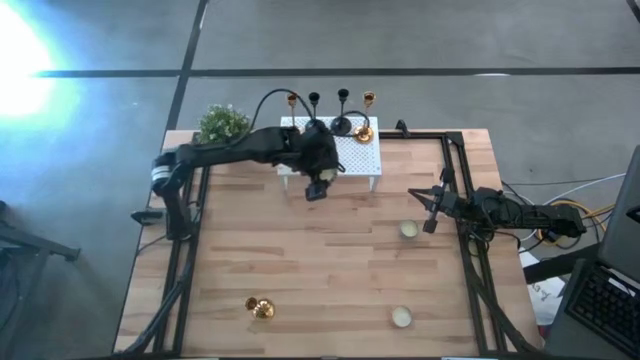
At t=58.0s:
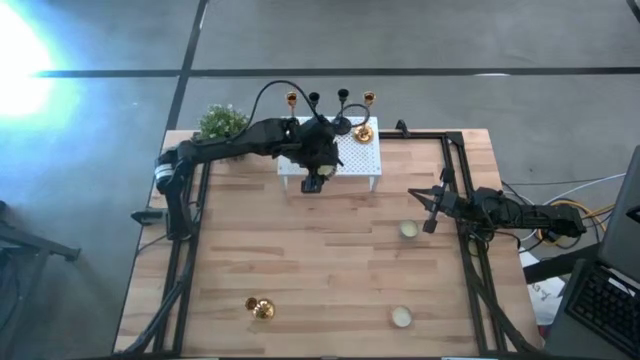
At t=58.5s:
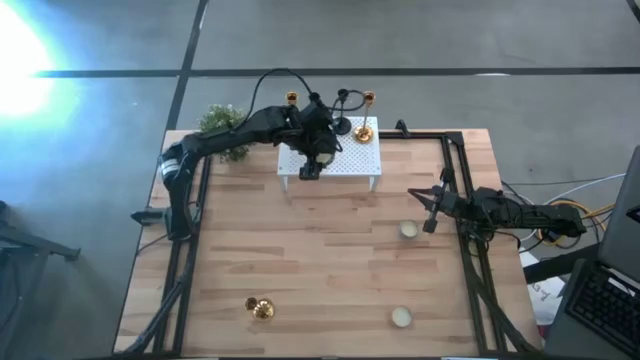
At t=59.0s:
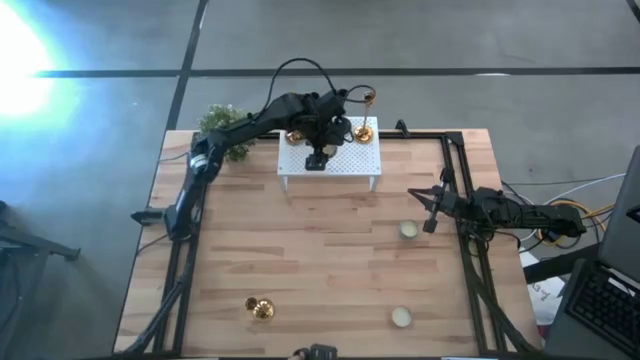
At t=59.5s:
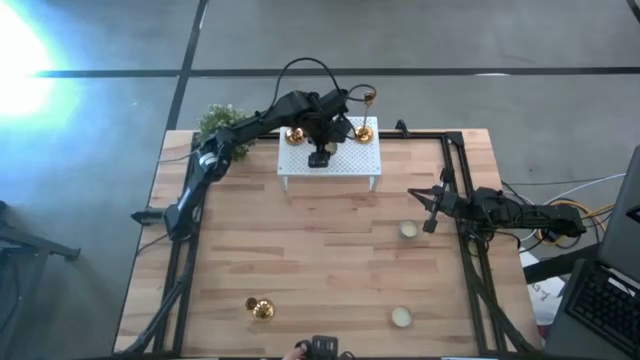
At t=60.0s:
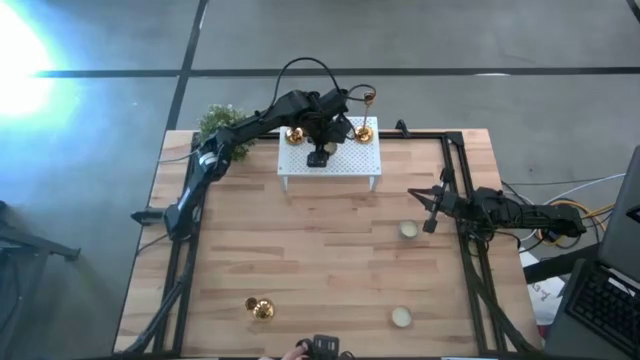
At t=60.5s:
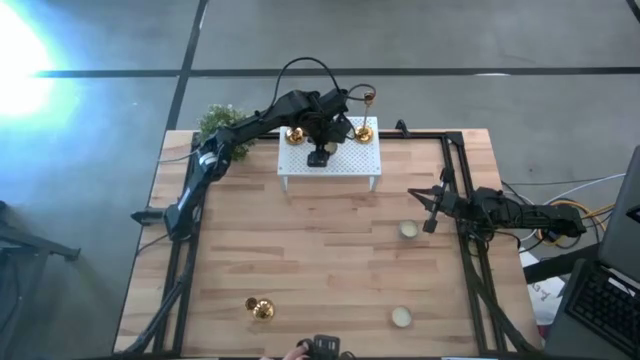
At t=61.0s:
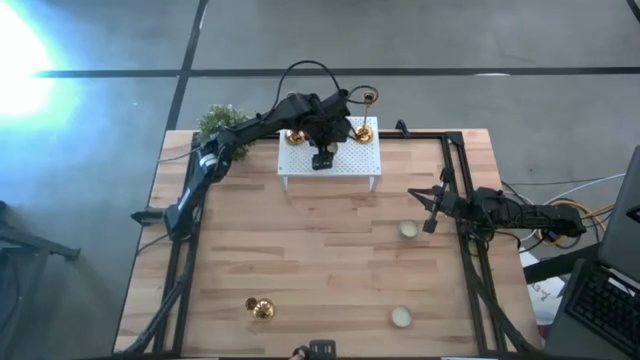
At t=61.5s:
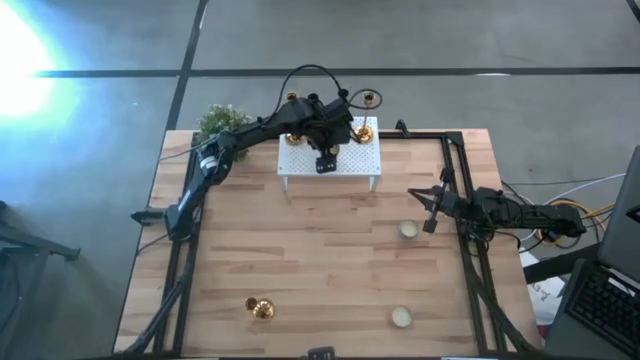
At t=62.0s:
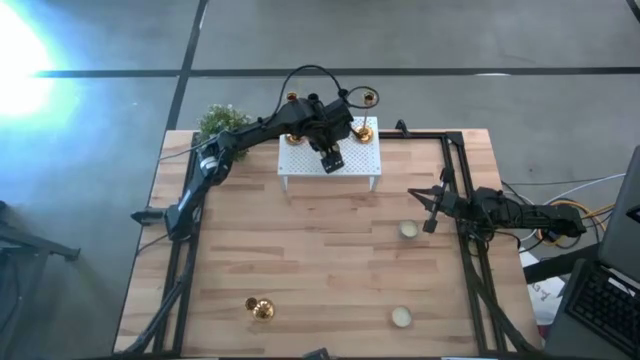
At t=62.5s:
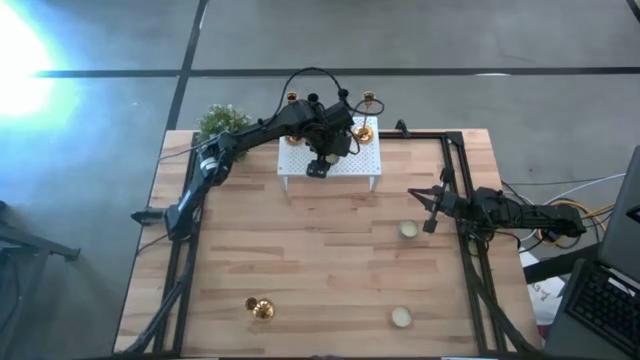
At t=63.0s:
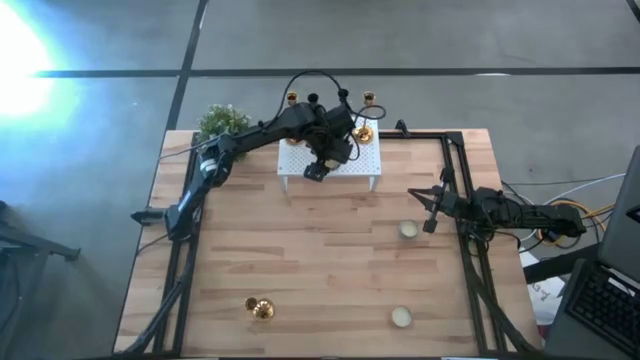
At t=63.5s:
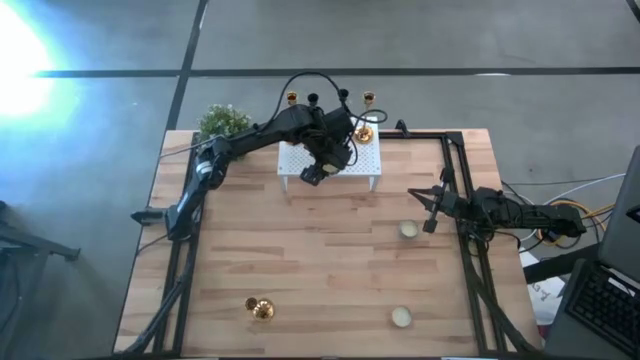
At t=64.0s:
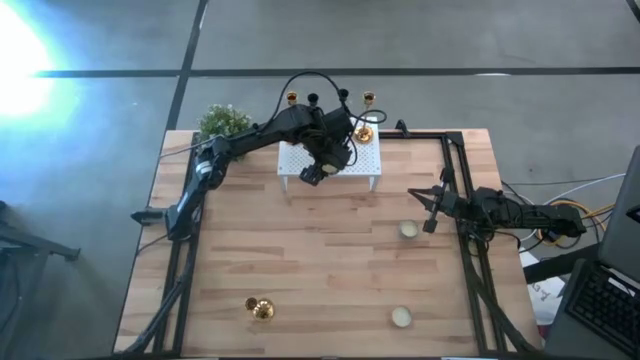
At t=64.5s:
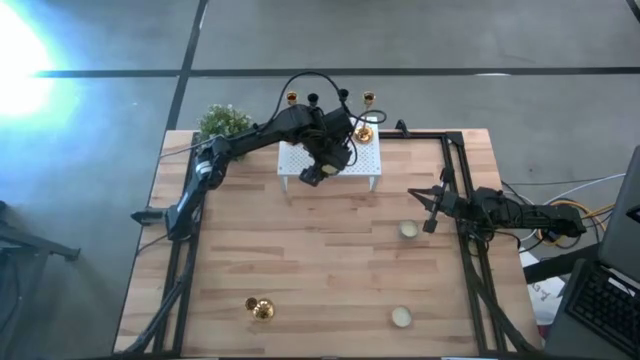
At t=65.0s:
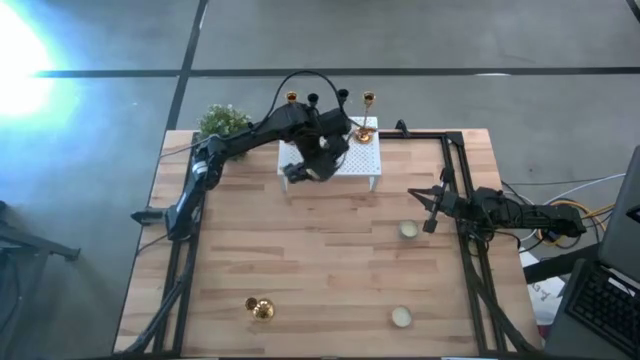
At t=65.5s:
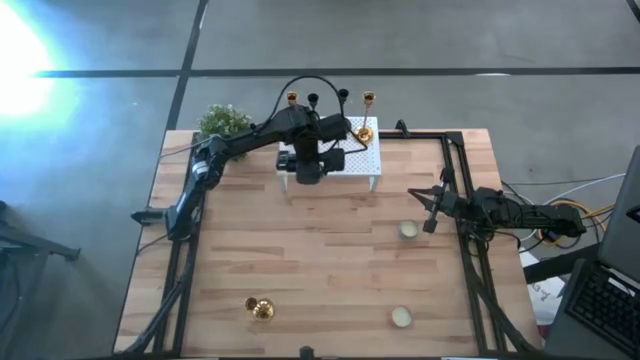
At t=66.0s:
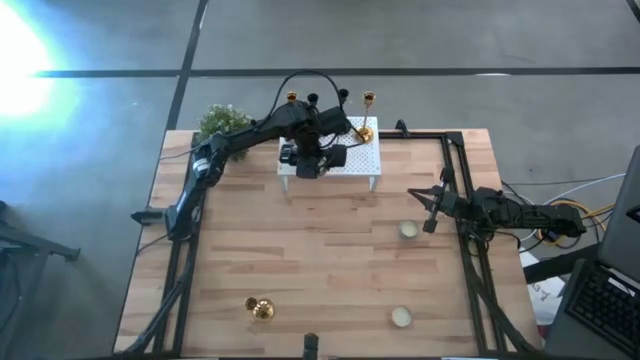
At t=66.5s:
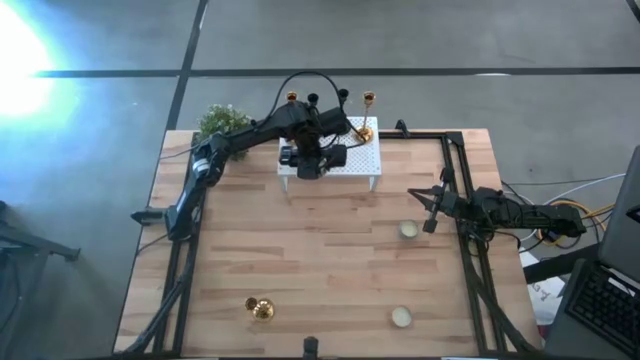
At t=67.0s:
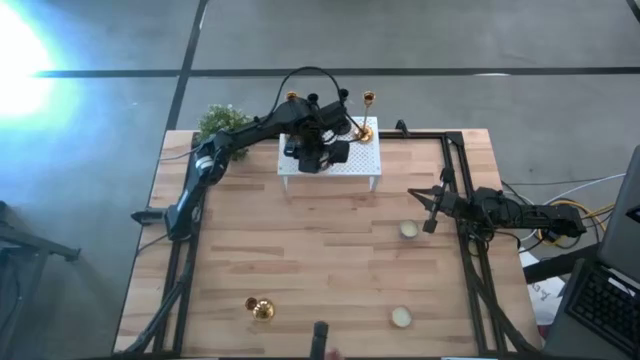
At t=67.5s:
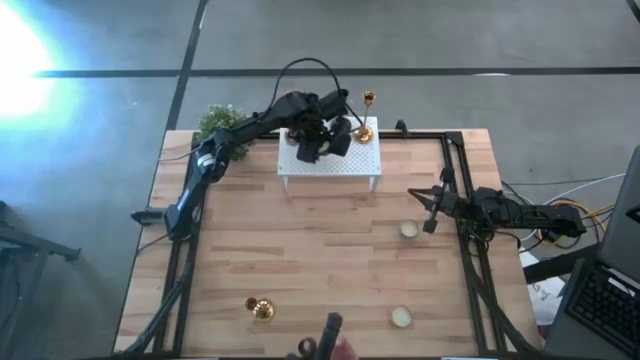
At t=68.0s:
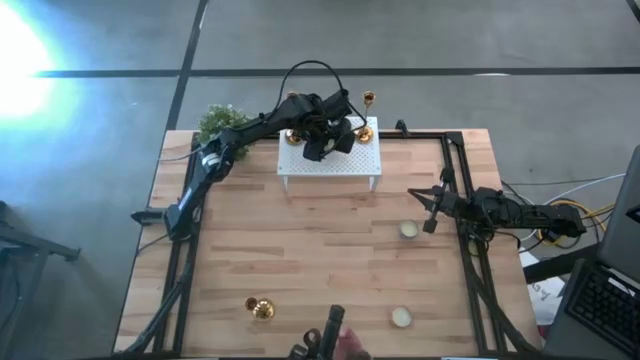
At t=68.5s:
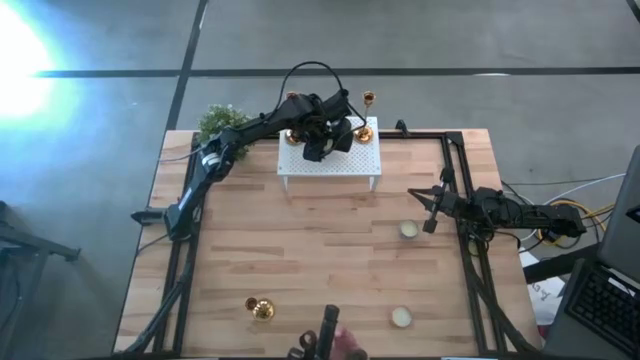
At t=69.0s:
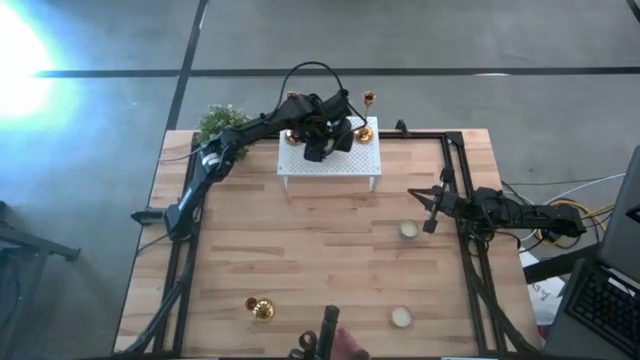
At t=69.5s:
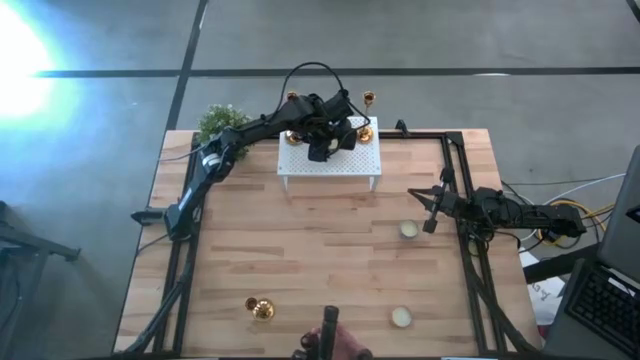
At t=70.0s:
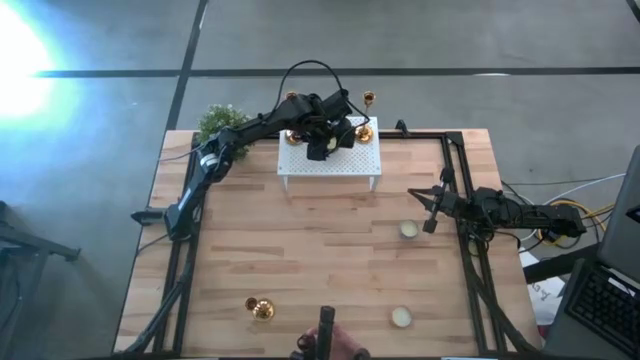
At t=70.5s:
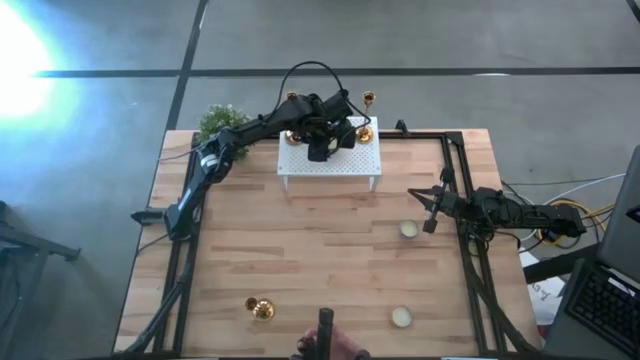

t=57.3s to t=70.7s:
Task: Pick & Place candle stick holders
Put the black scented candle on the shelf

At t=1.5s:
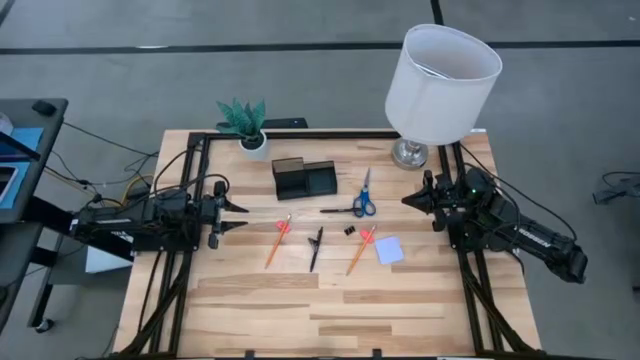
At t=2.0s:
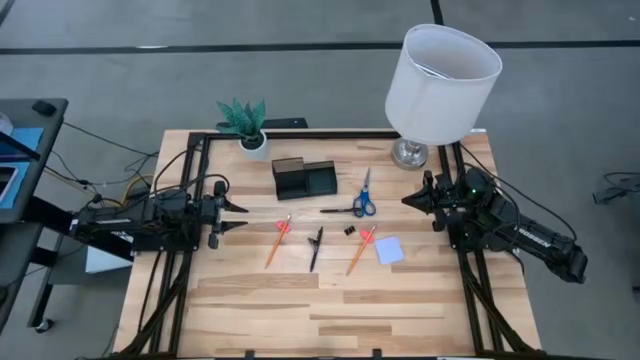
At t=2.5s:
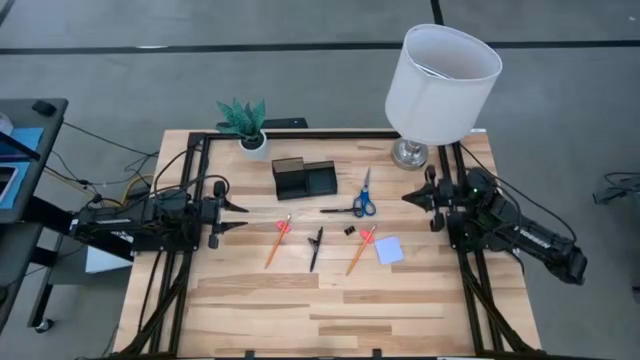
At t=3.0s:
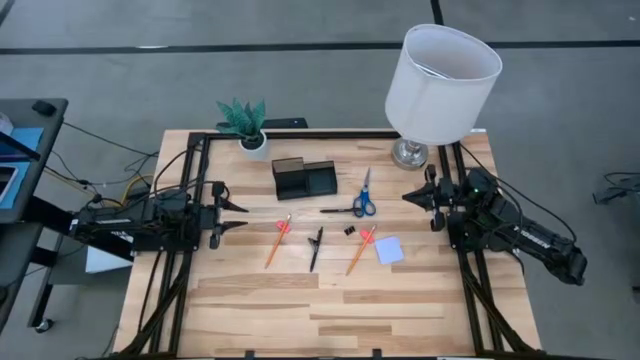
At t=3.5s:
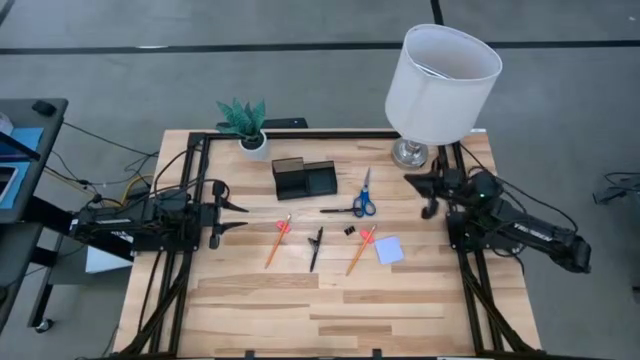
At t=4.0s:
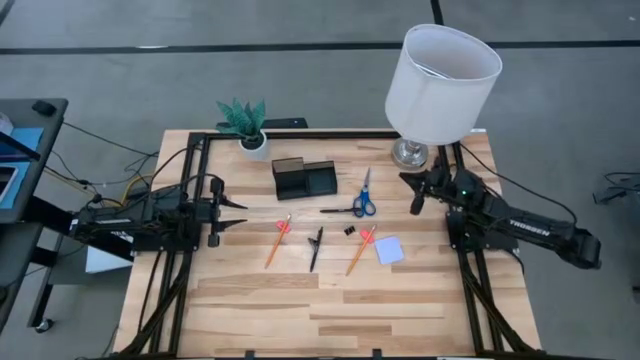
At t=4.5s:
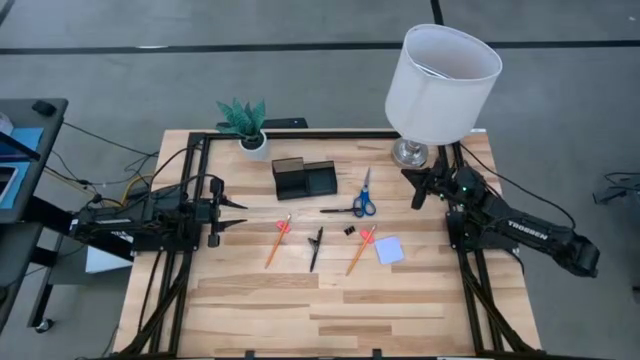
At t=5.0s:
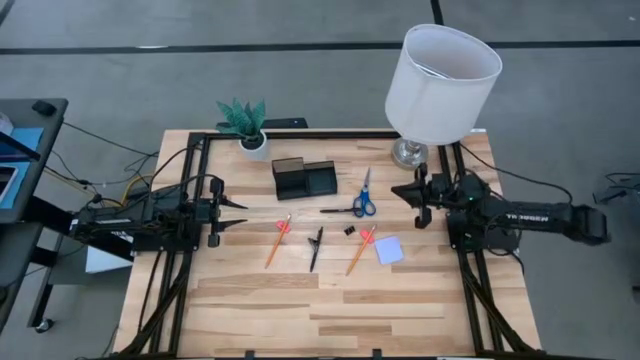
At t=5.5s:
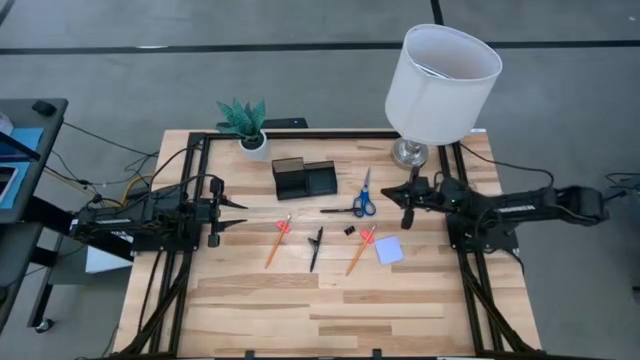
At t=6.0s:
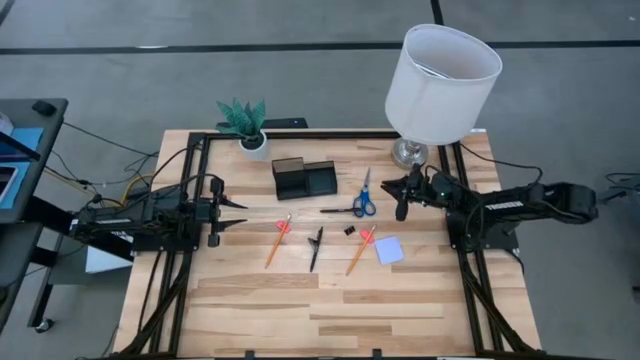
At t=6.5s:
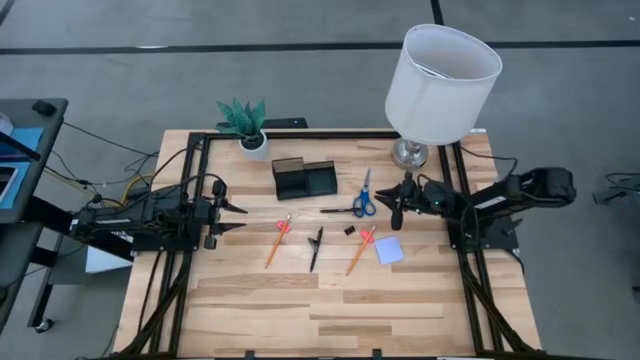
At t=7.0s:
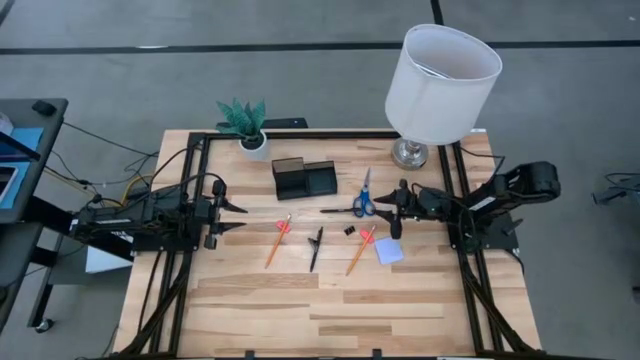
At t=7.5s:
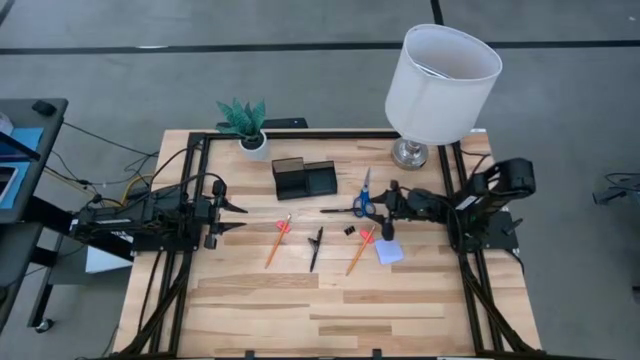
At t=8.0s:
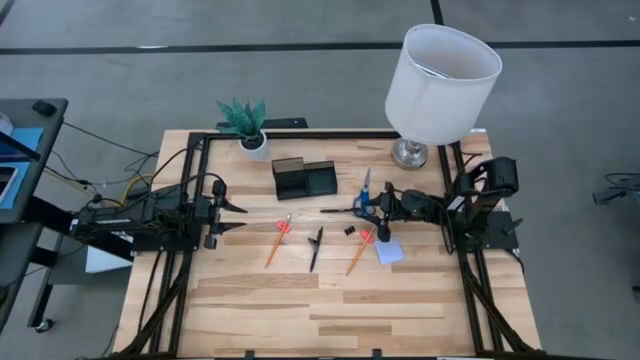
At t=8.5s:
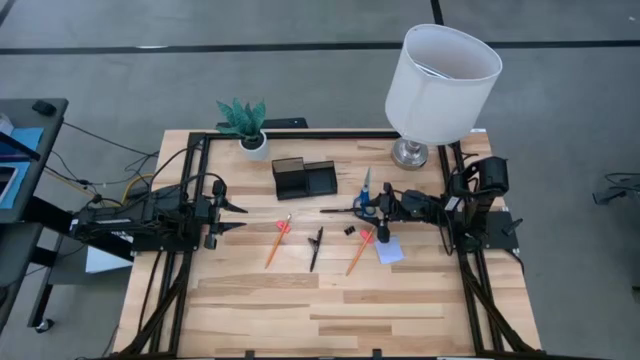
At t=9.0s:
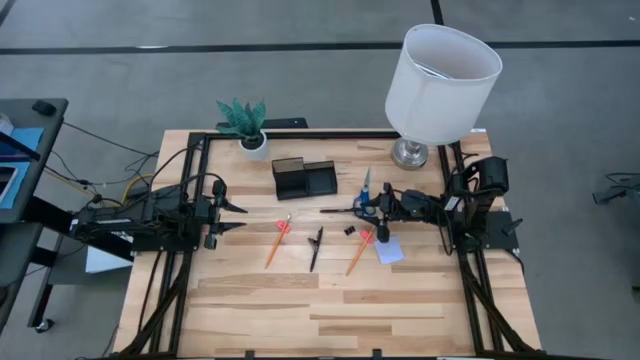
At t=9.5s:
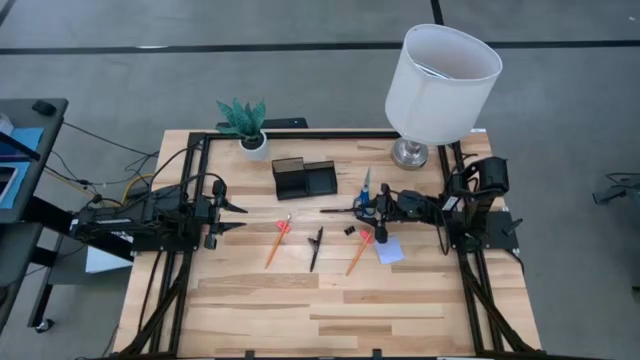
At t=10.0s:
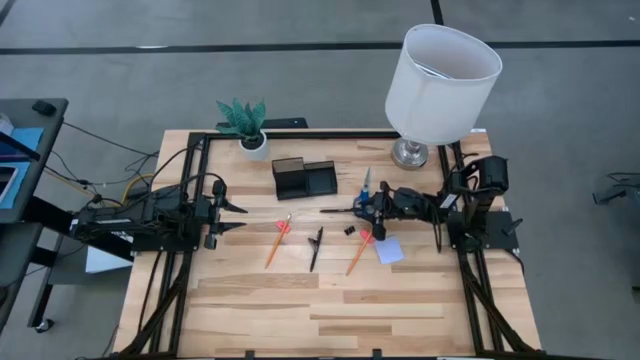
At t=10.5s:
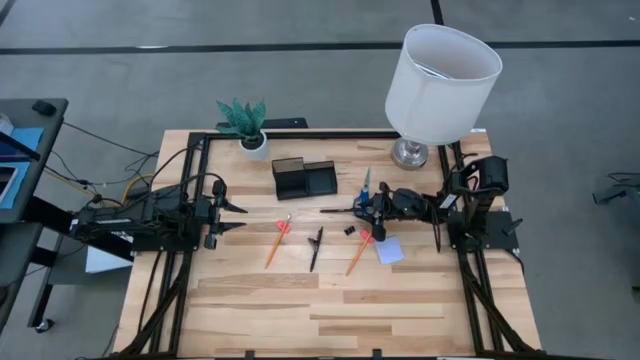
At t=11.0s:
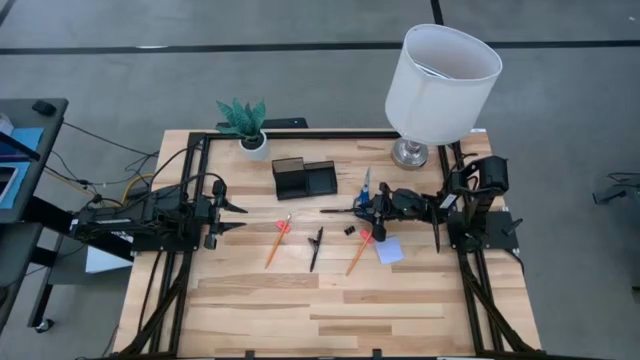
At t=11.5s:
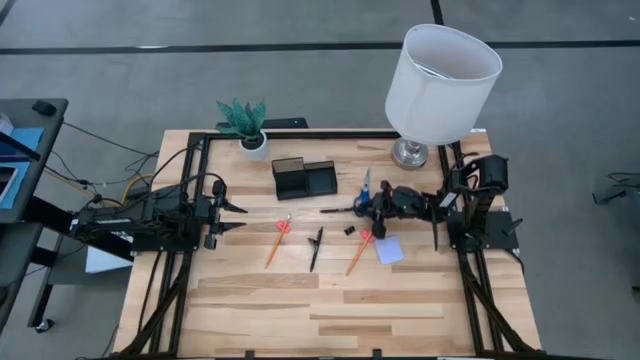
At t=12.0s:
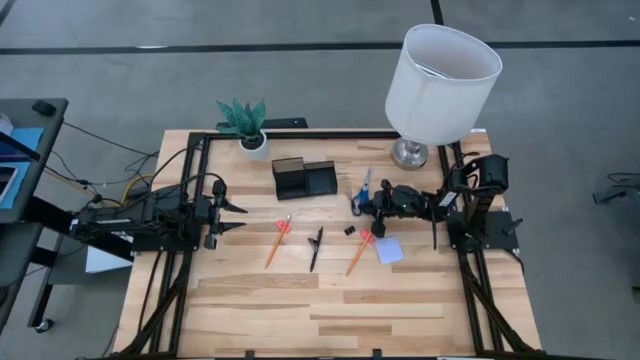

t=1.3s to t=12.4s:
Task: Pick and place office supplies into organizer
Put the top black pen into the black desk organizer
